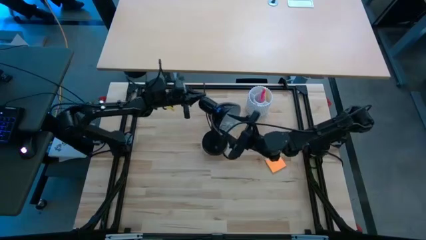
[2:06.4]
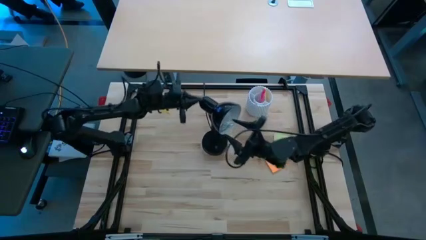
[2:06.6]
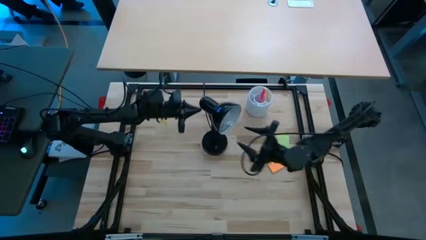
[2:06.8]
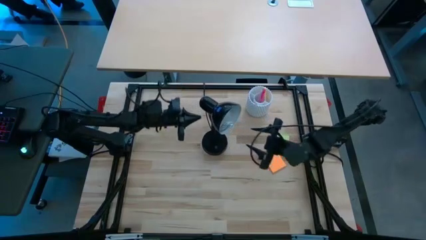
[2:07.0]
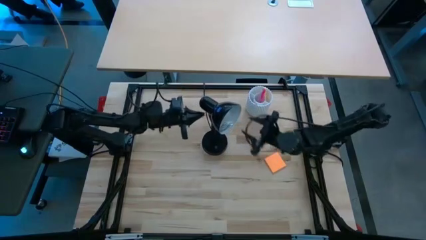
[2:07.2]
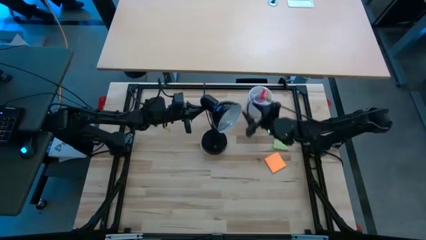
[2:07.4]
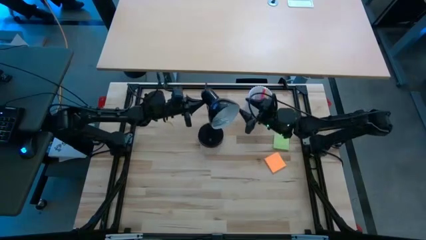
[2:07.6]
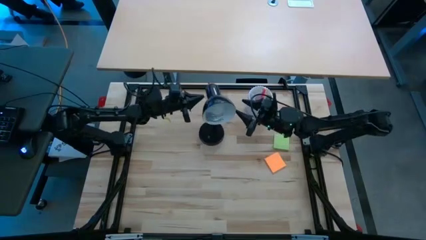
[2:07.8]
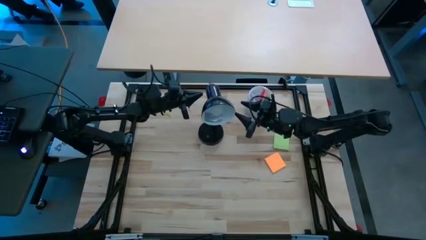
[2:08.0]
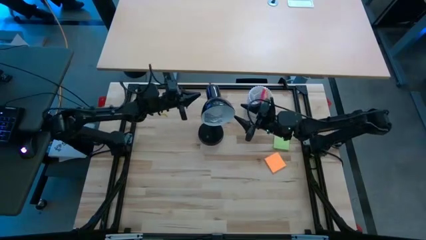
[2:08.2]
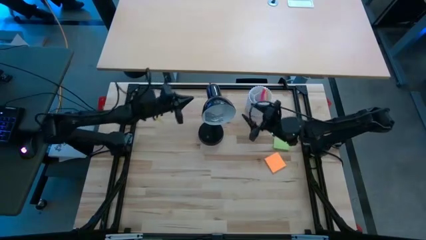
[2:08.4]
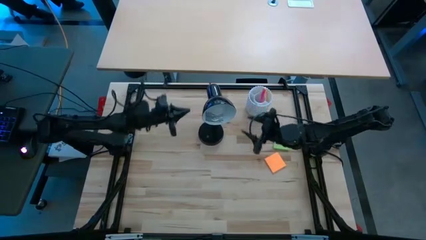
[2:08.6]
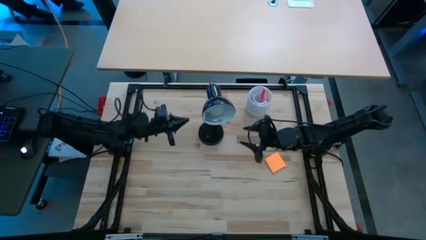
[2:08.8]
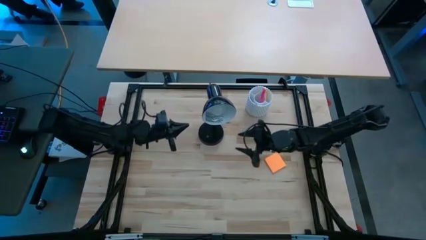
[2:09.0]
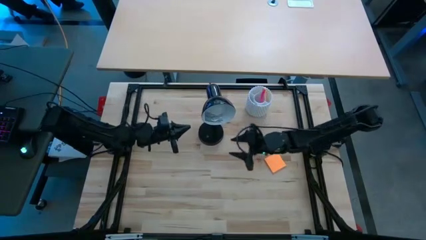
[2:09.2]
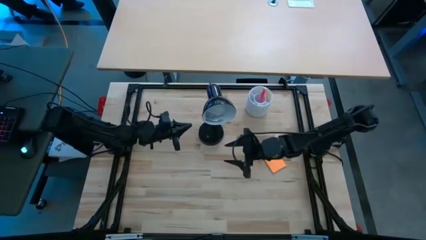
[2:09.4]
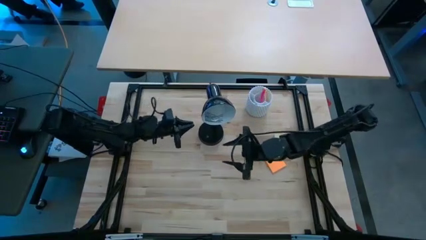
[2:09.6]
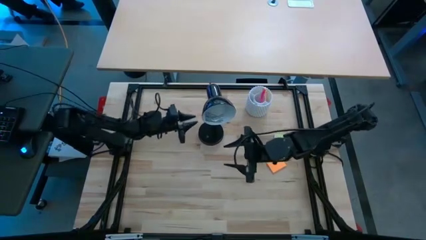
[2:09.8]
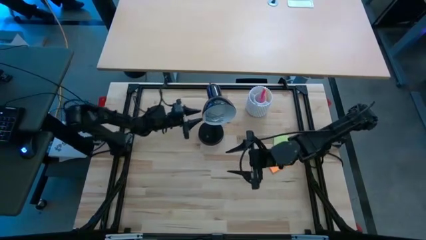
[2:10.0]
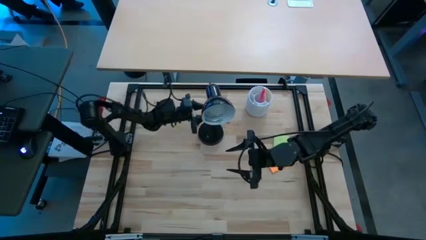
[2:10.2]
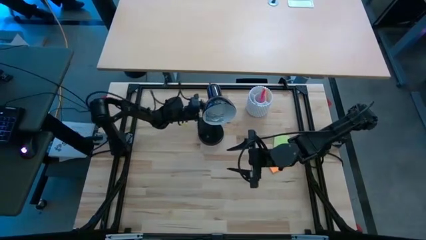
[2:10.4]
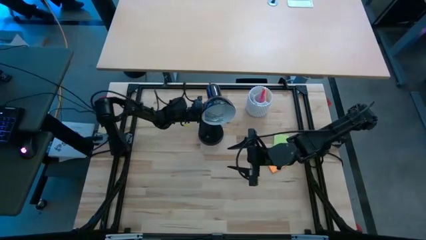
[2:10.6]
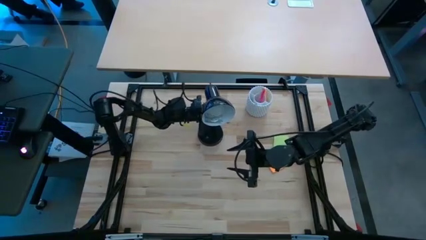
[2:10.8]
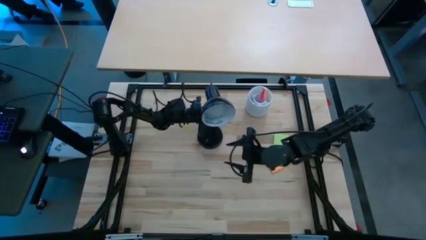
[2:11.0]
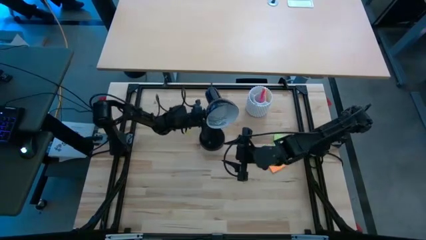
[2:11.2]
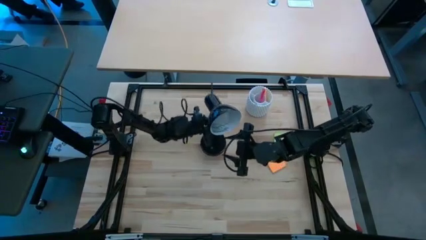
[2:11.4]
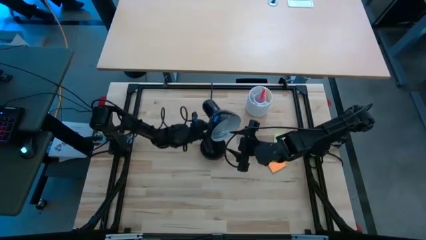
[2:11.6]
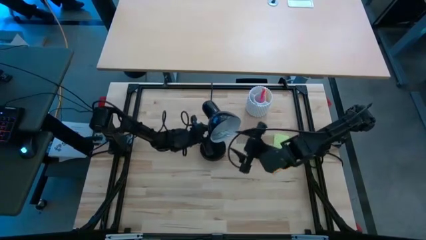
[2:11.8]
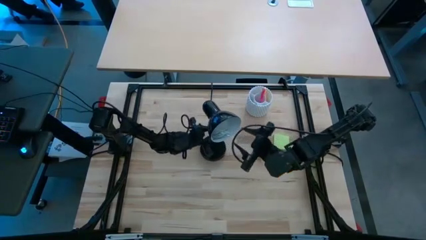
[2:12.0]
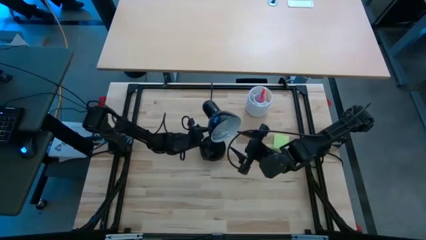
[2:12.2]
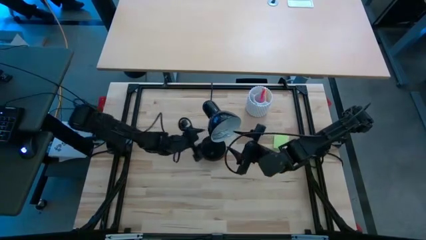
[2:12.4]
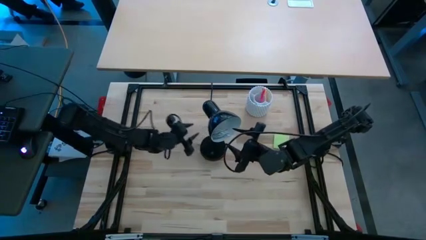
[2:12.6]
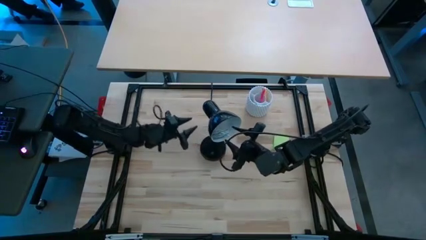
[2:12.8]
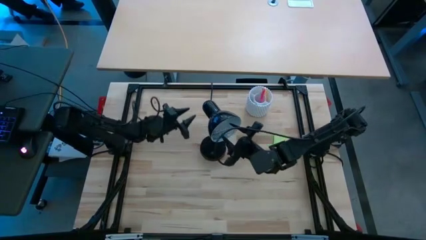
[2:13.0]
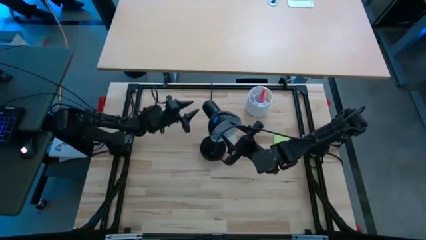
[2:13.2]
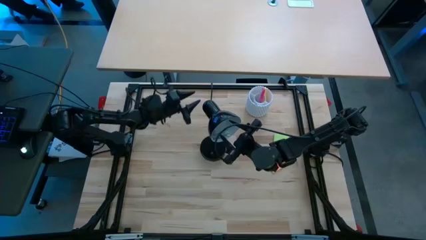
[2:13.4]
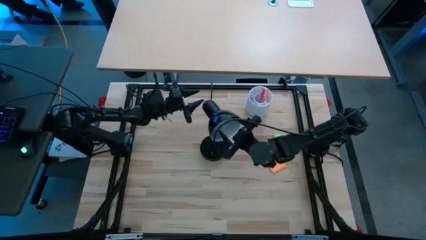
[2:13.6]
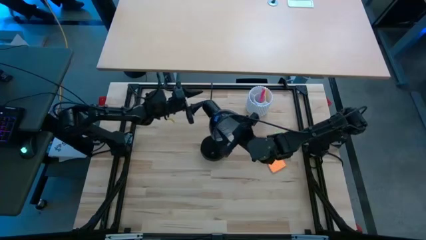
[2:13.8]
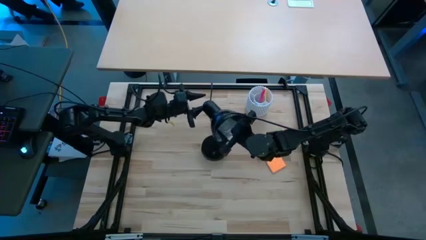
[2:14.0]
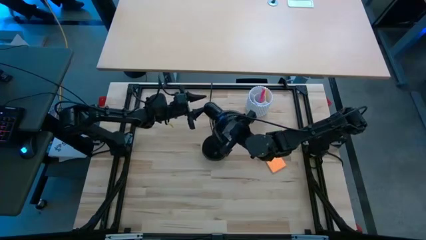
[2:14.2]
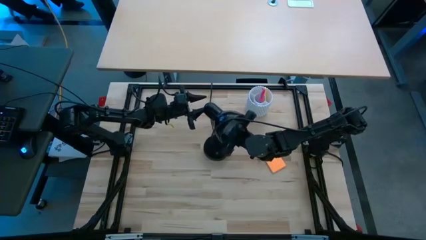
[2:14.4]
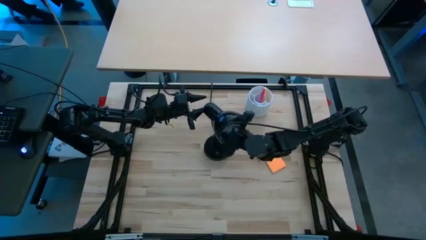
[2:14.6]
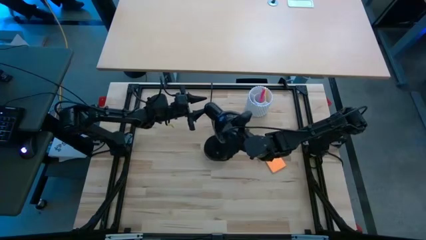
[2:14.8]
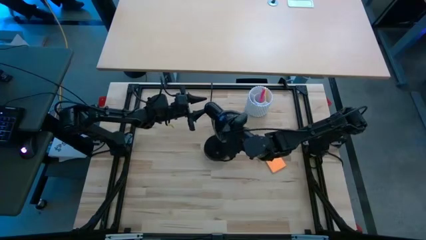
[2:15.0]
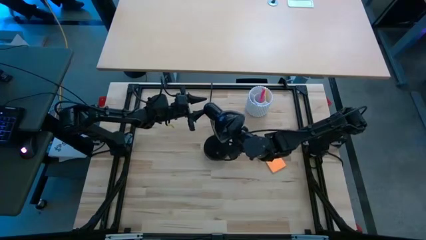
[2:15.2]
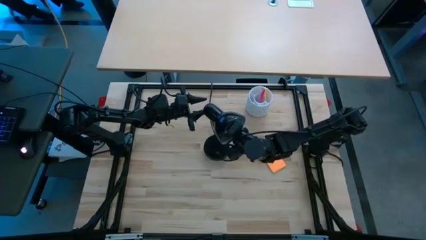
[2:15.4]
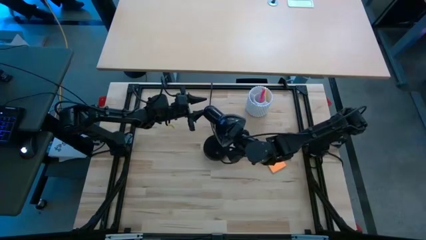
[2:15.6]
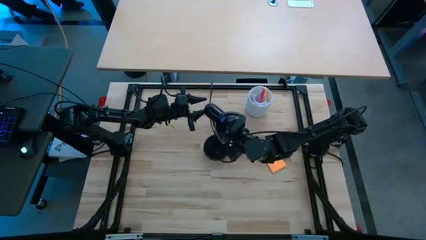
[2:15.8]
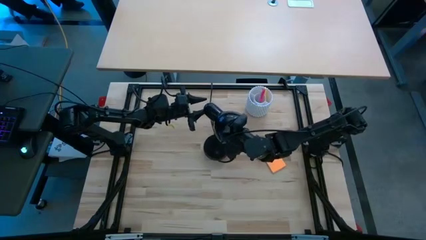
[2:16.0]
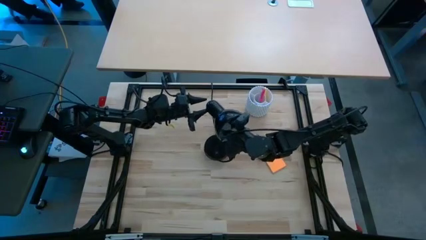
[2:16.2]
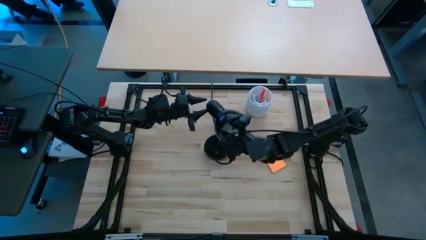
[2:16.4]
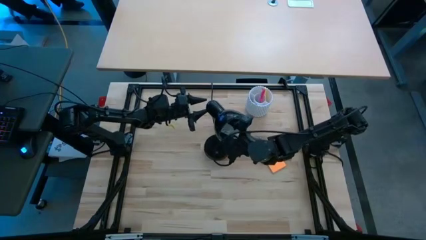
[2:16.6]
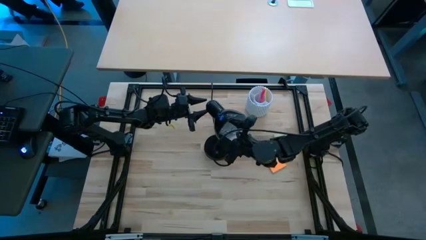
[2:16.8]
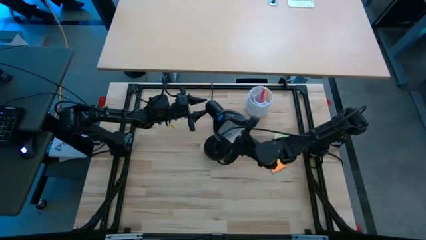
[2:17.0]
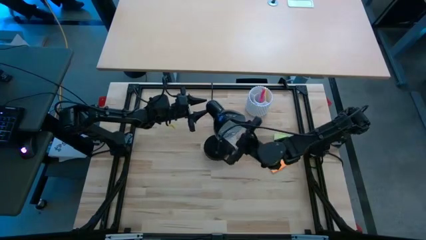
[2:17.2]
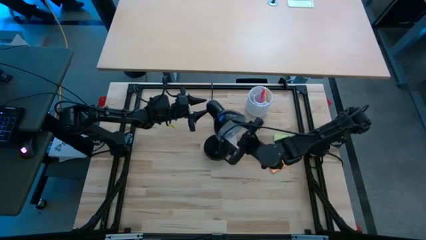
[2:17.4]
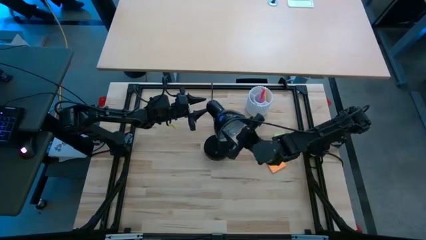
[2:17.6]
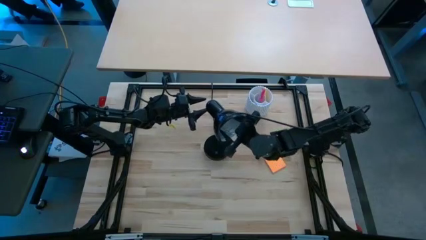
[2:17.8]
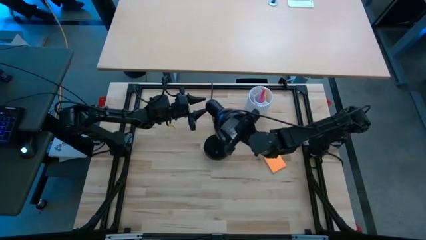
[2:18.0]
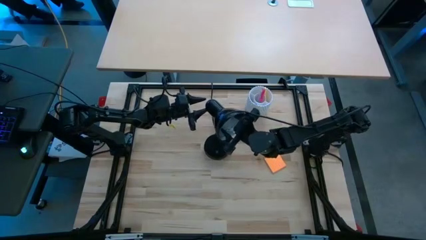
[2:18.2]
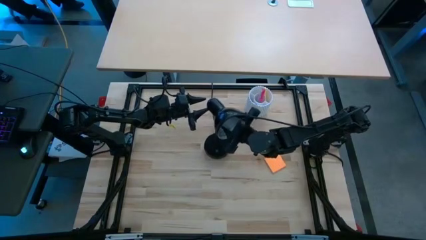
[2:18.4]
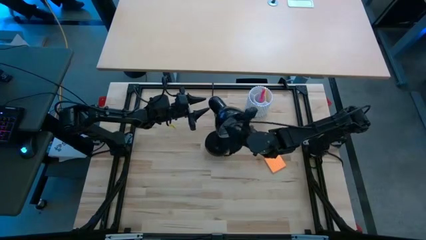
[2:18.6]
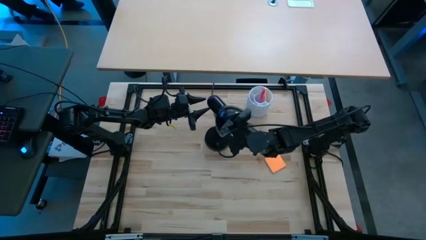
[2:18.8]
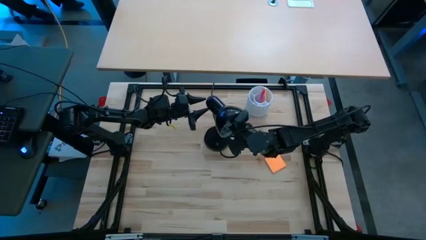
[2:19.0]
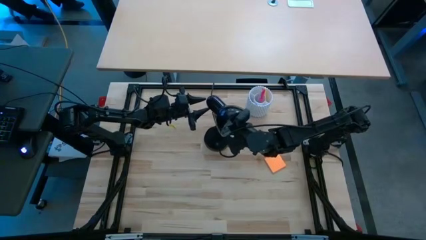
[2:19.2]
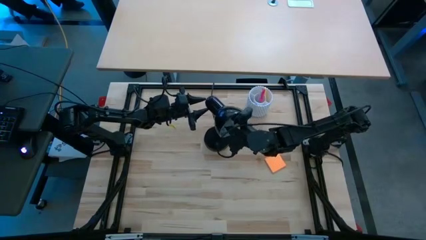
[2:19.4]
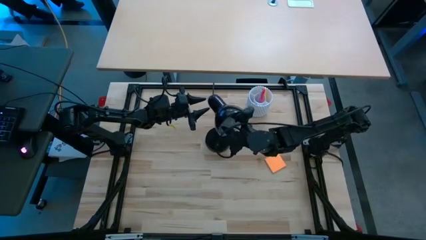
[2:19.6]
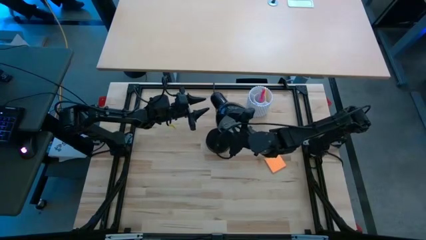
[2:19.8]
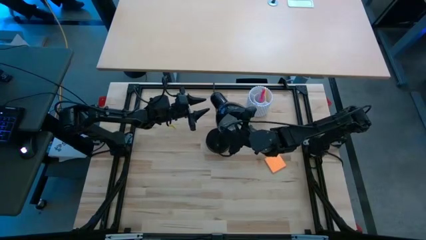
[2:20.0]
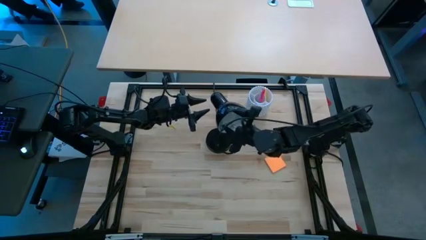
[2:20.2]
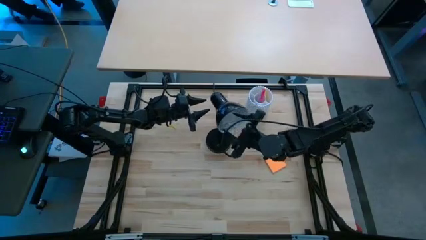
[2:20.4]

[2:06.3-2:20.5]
Task: Screw lightbulb
Remove the white lightbulb from the black lamp

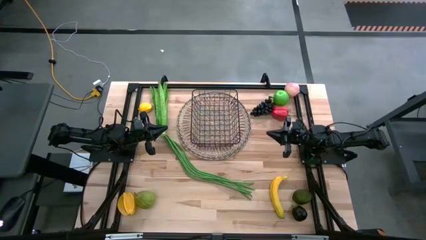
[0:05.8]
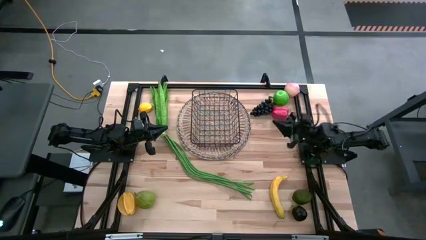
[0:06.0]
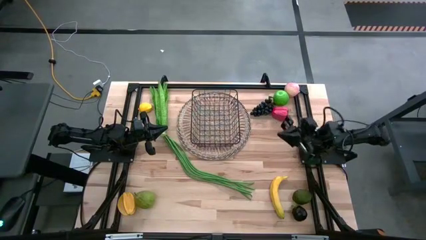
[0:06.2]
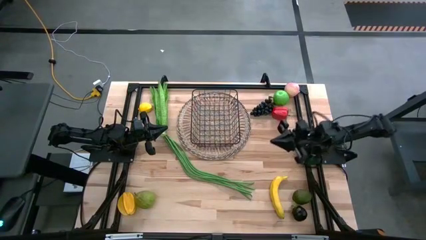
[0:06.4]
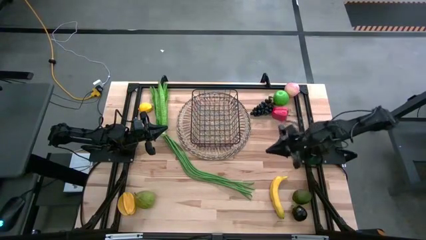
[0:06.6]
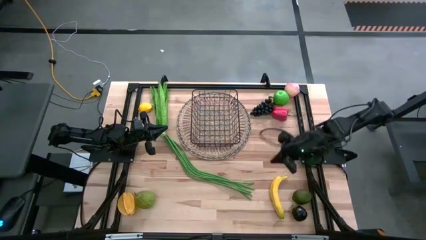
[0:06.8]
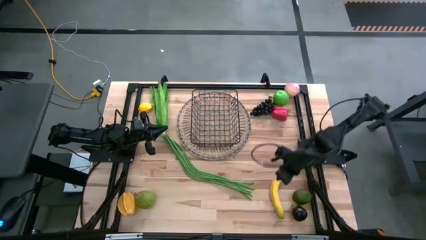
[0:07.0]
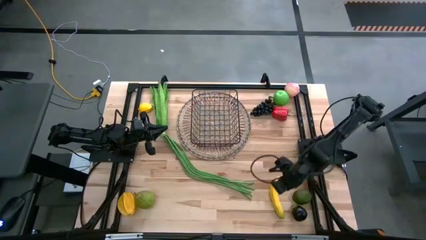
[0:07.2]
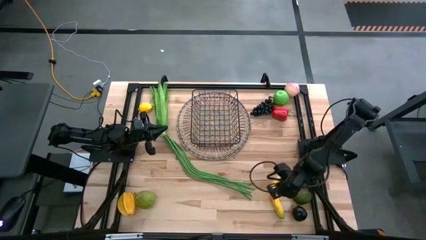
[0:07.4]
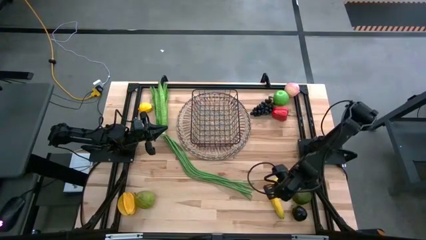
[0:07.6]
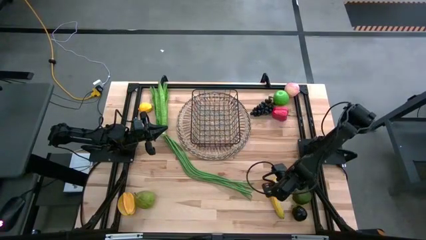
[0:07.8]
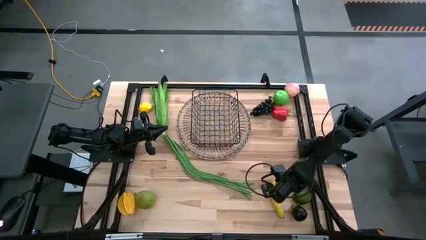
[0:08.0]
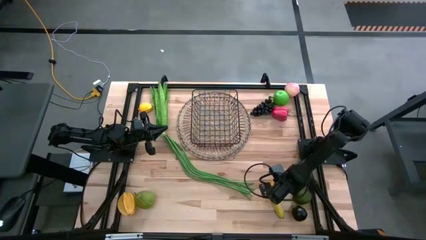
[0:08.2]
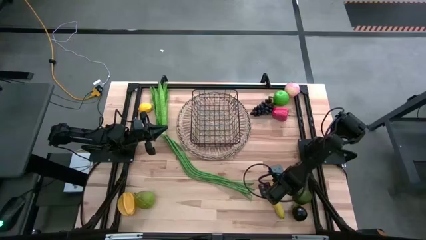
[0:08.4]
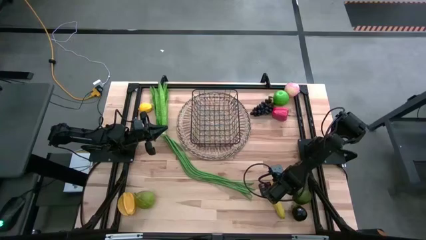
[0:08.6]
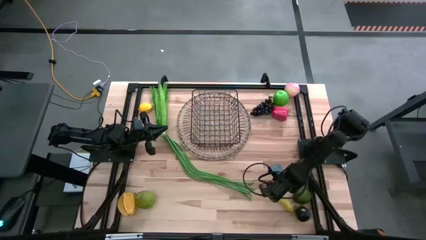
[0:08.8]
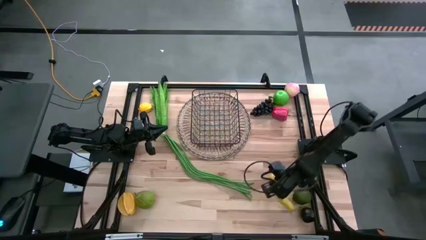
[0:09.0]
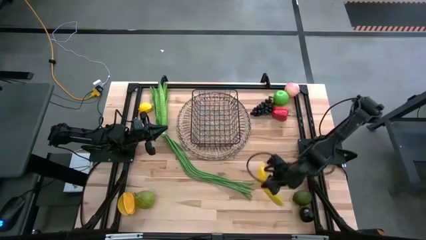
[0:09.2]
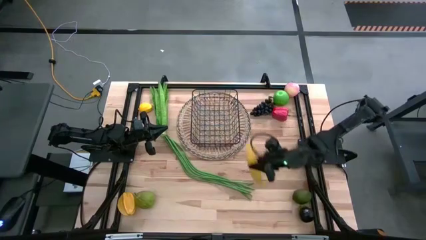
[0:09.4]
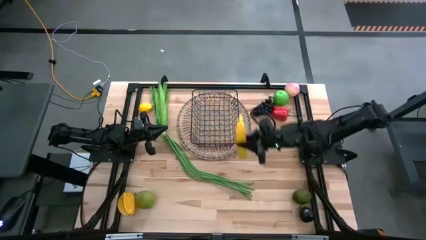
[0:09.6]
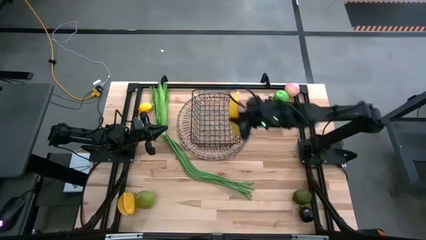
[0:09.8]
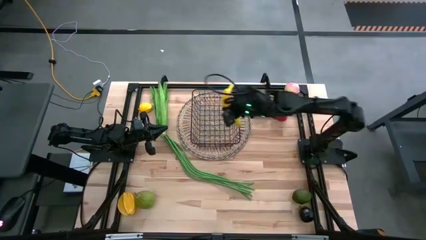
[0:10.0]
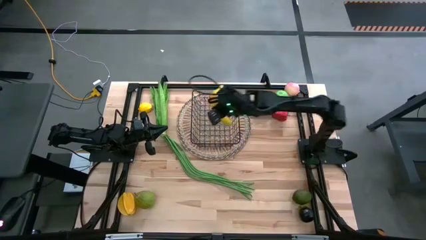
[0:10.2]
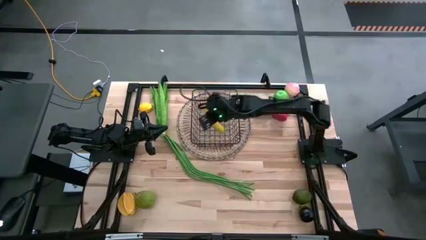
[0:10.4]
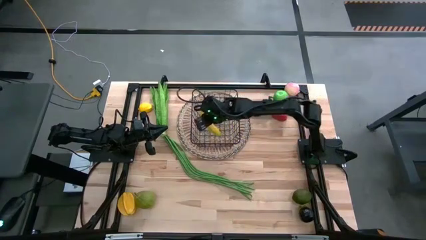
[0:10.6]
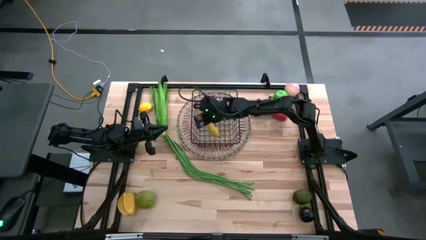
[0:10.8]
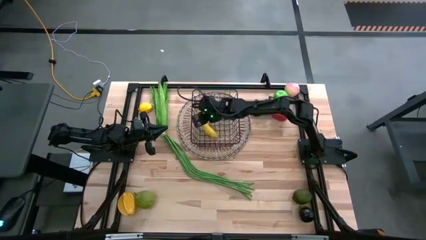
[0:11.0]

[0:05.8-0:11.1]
Task: Build produce basket
Put the yellow banana in the black mesh basket
